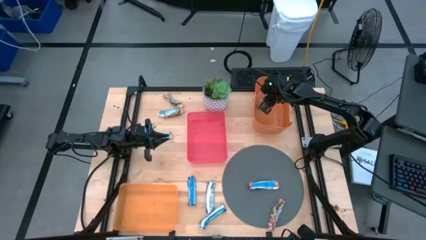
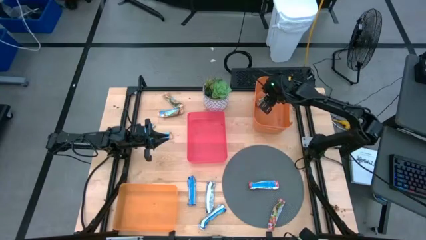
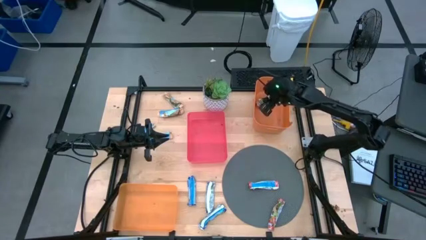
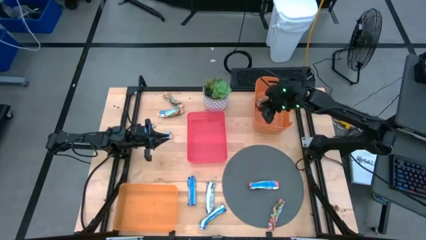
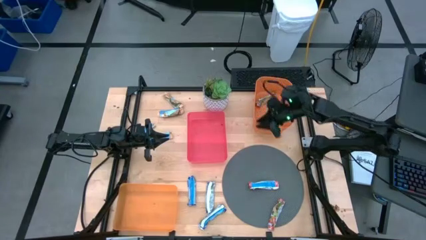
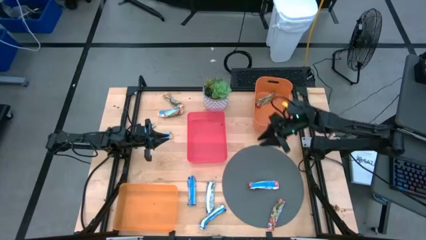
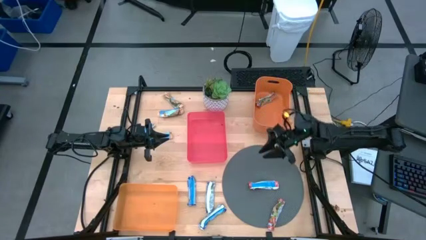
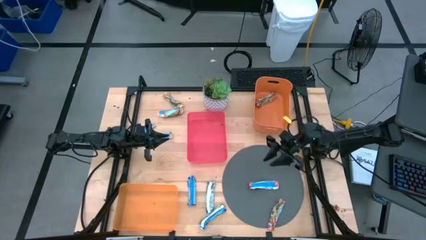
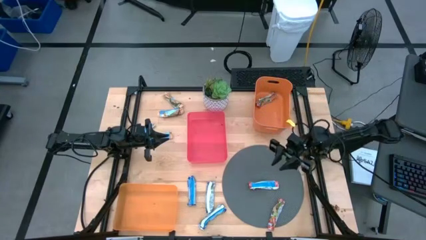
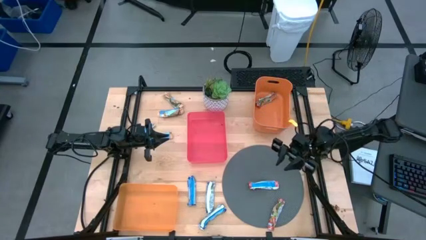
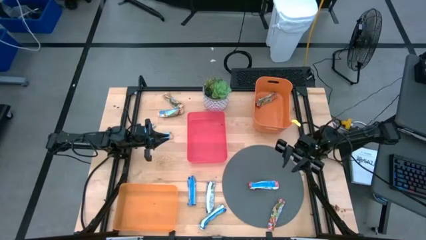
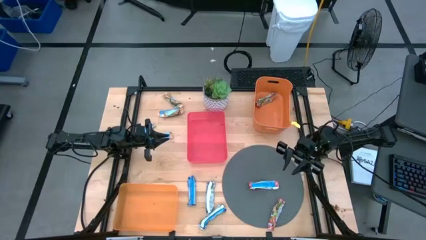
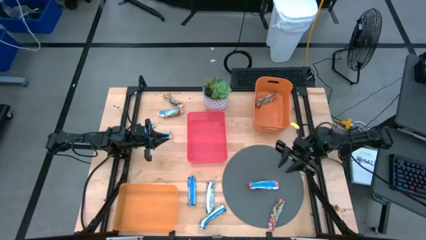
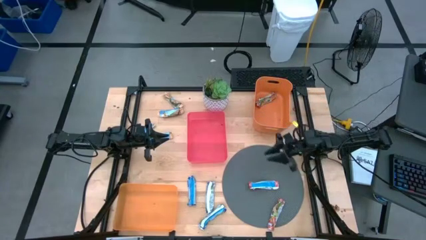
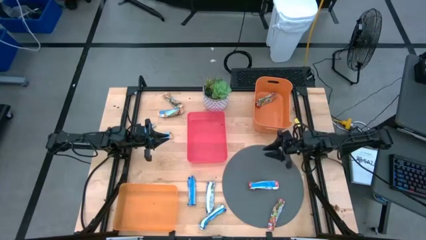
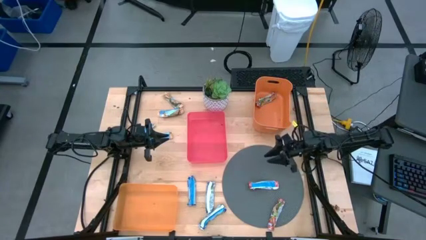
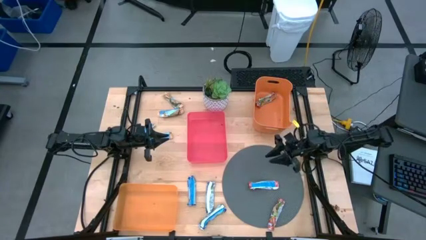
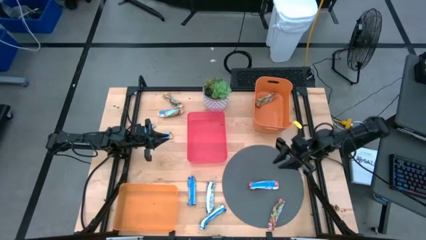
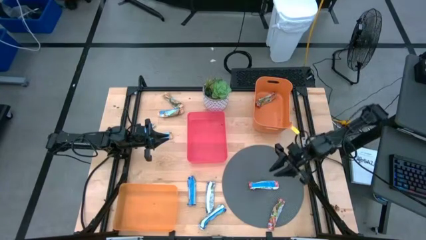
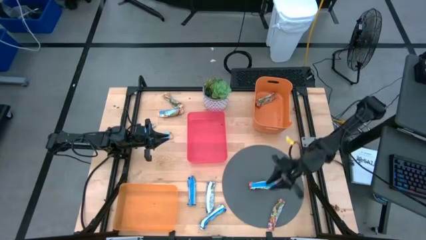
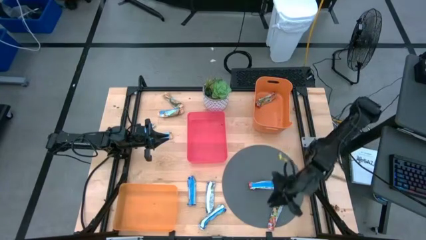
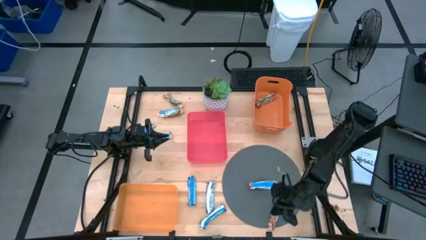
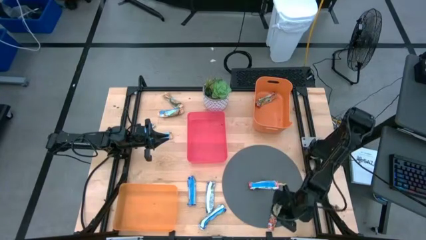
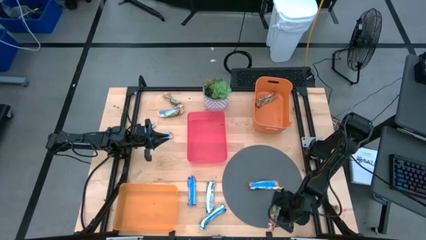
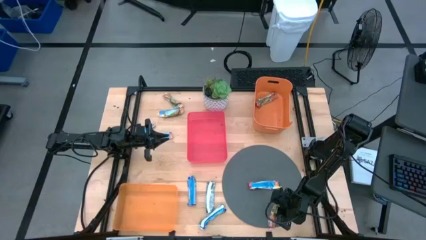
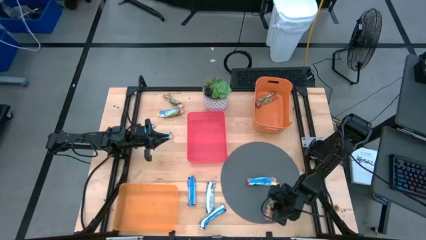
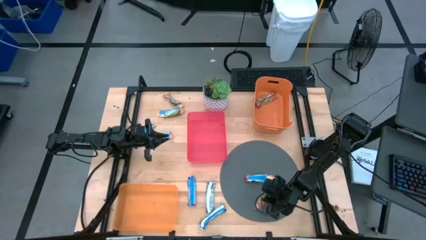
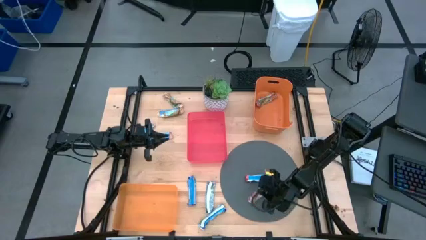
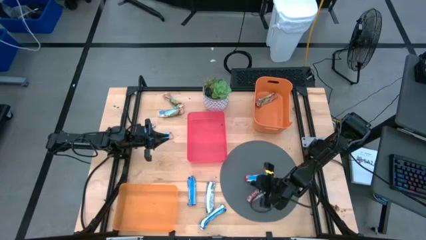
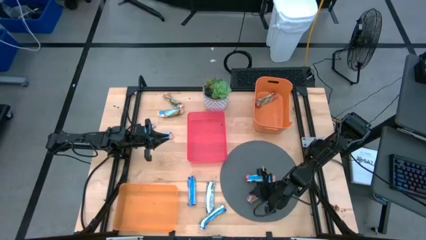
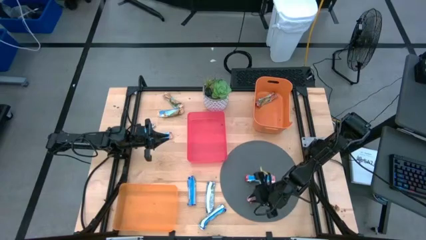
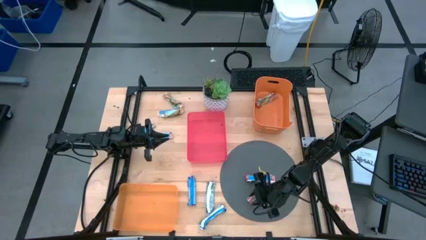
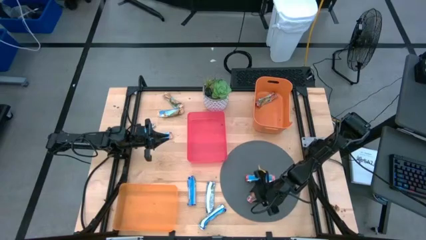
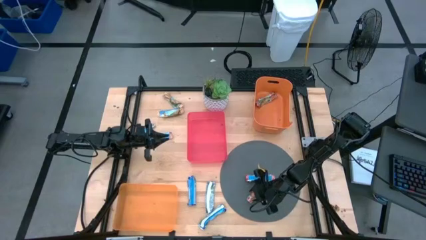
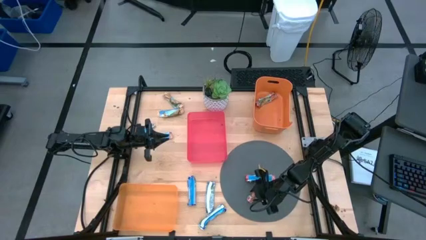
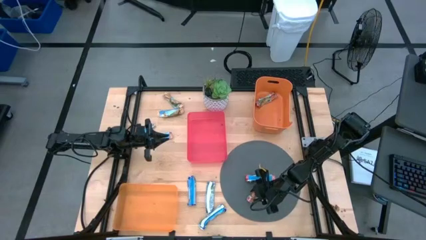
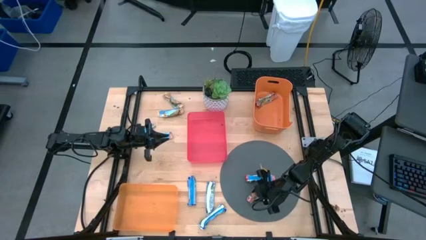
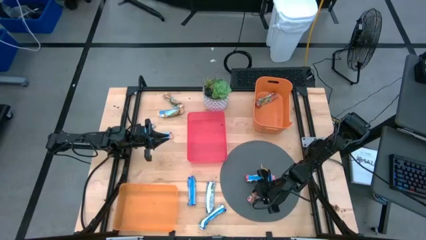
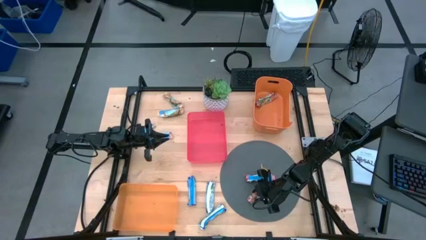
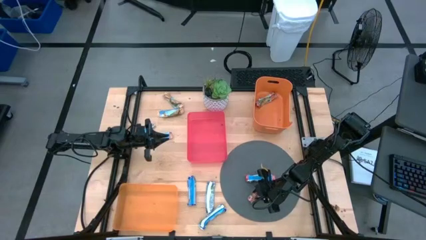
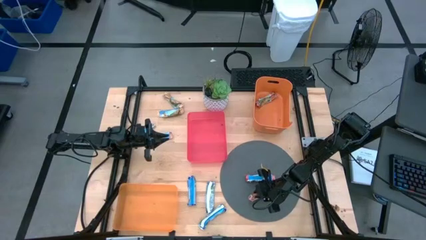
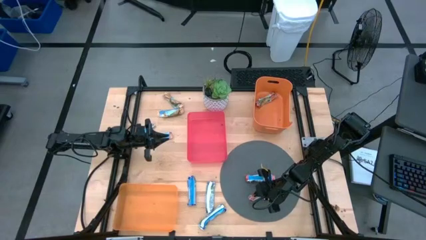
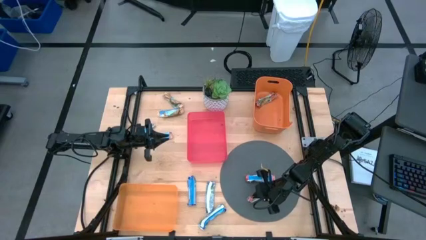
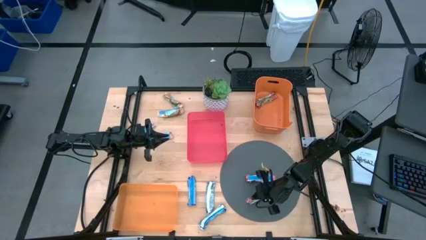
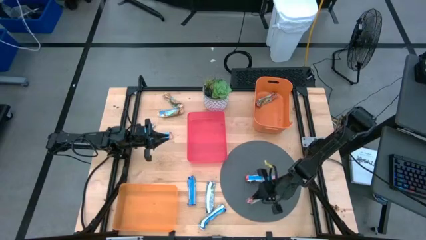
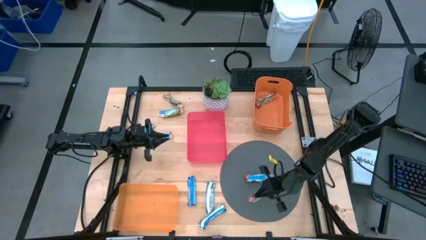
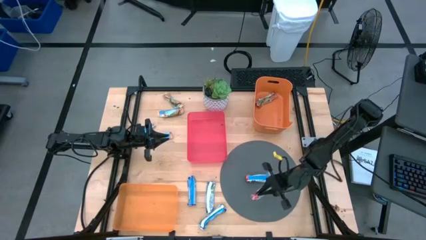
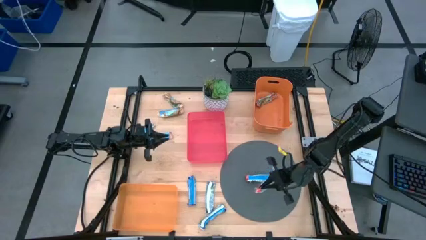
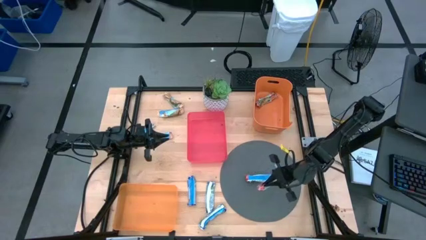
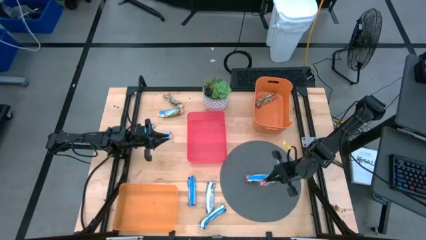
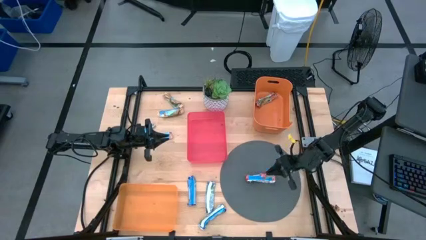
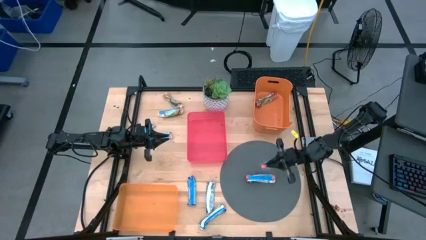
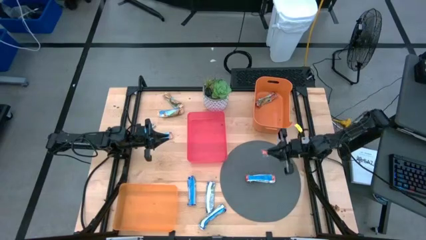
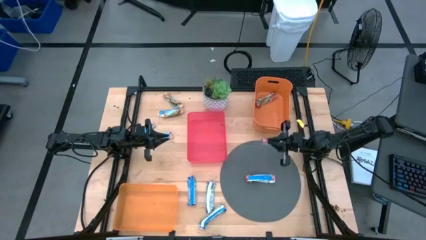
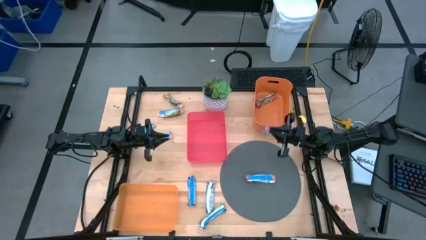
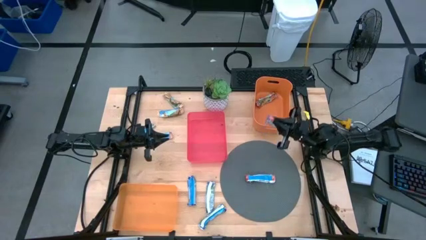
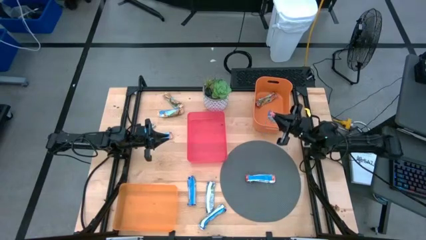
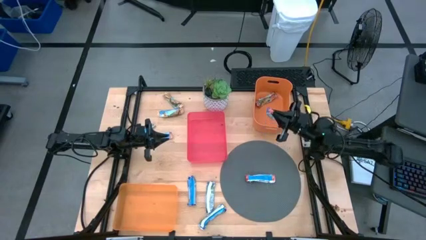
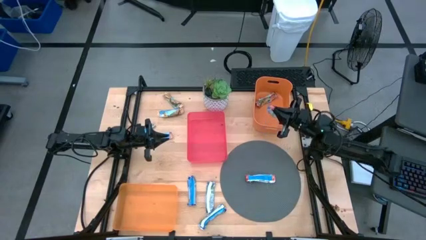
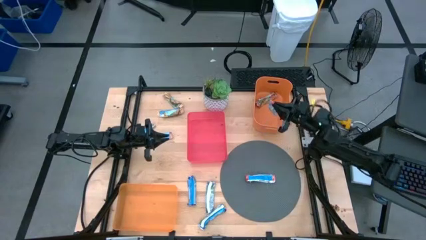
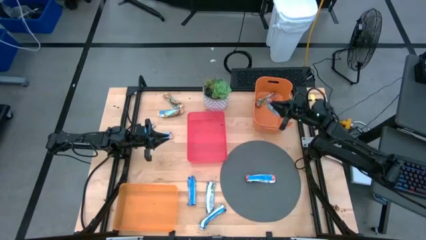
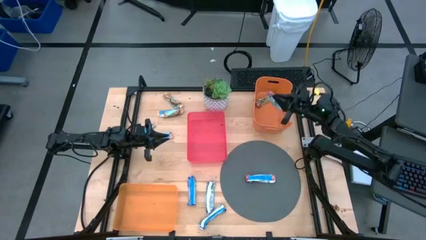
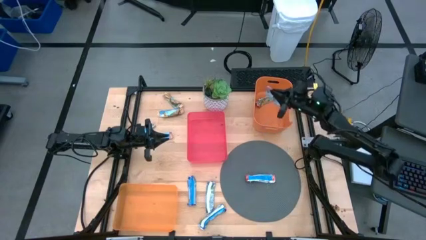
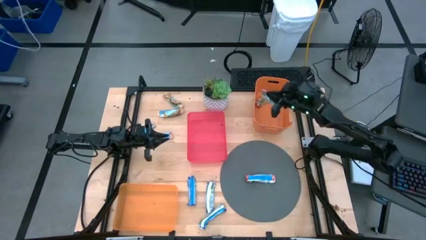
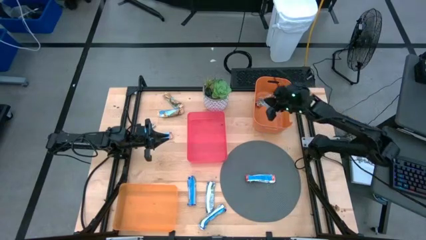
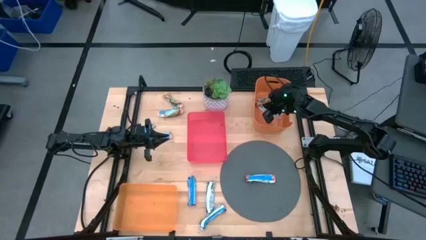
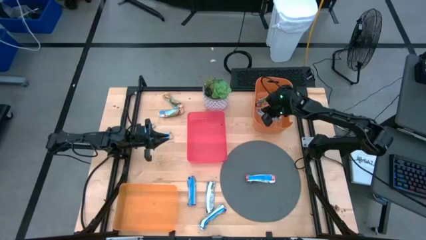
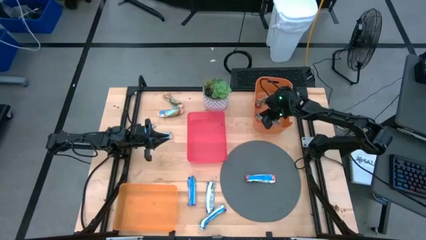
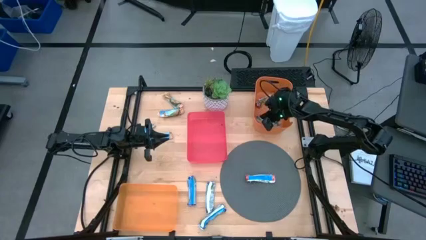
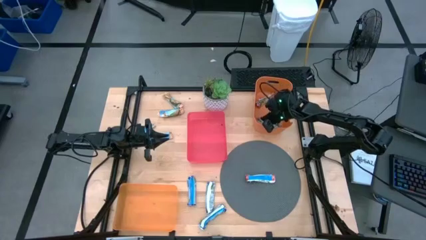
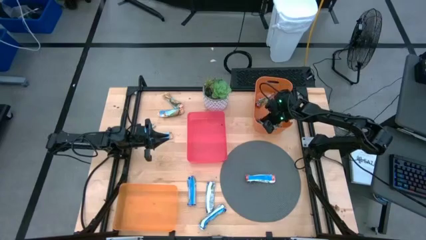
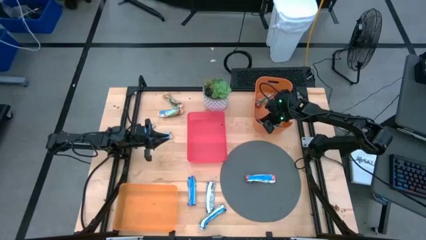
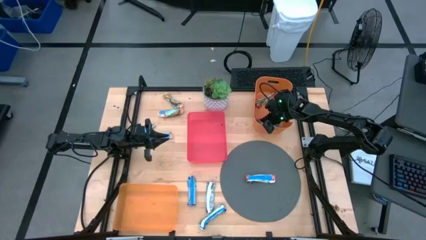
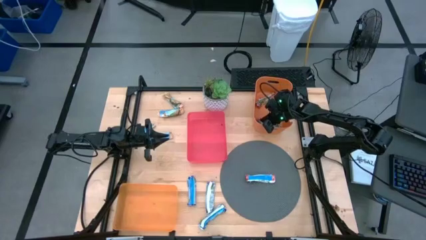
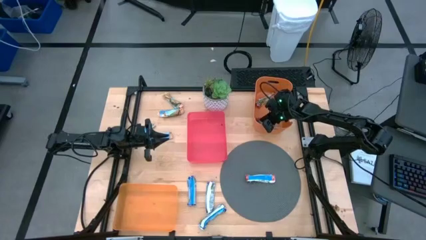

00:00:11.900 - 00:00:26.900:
Task: Pick and place Granola Bars by type
Put the green/red granola bar into the top right orange bin
